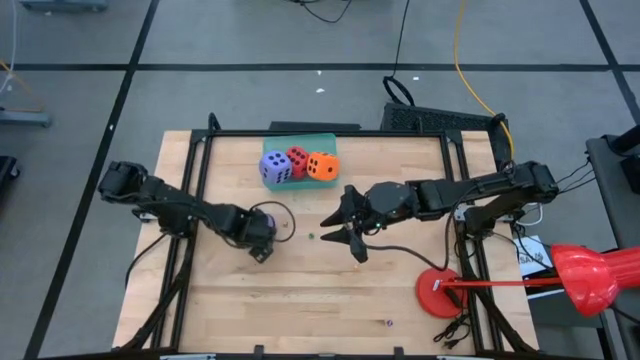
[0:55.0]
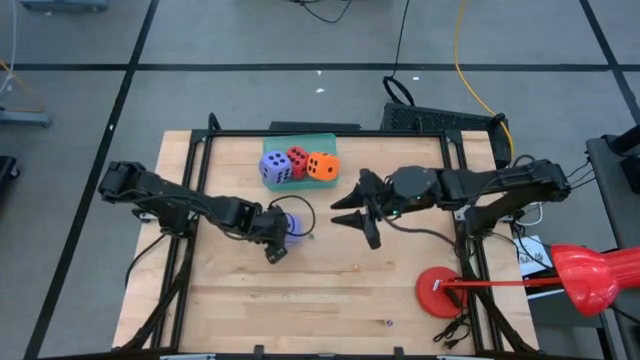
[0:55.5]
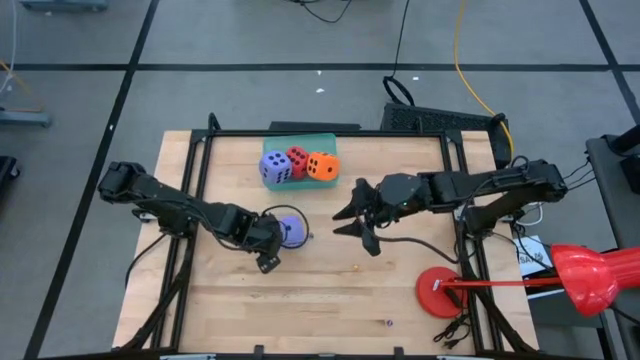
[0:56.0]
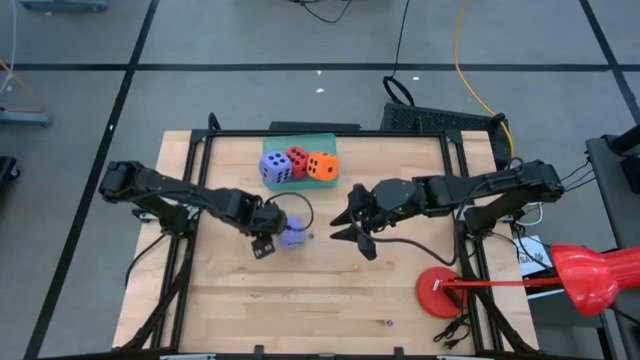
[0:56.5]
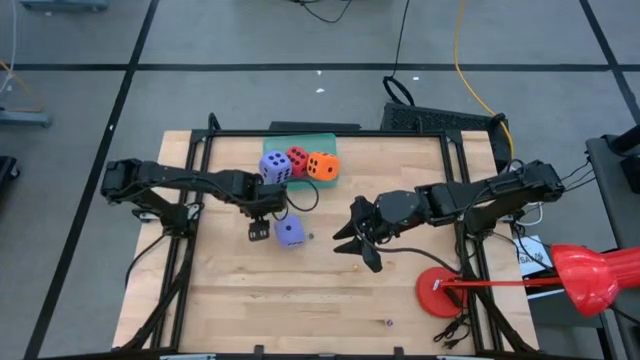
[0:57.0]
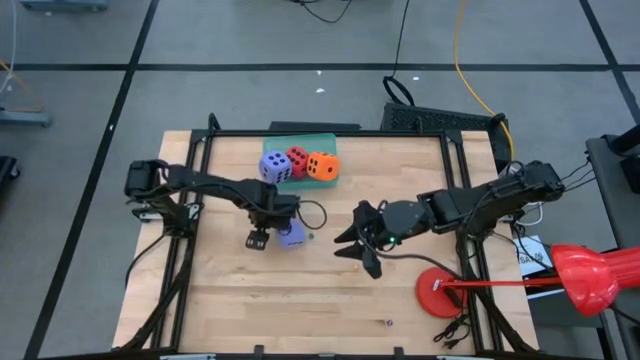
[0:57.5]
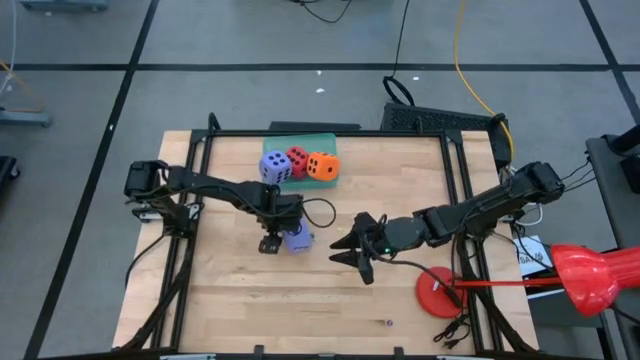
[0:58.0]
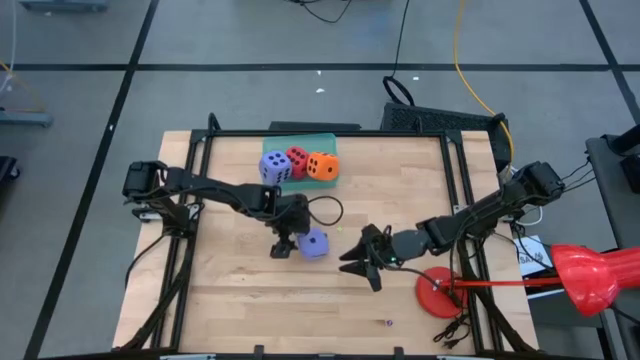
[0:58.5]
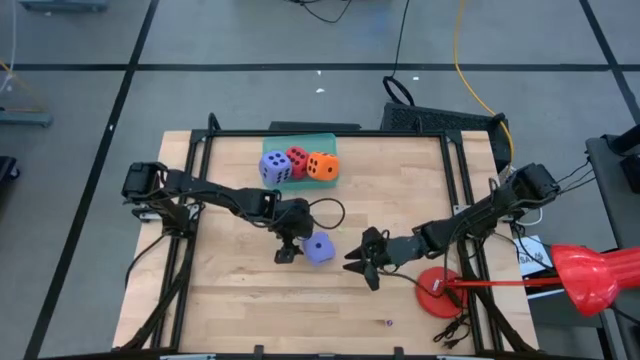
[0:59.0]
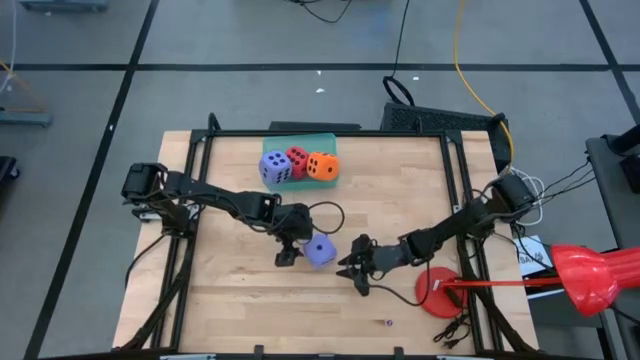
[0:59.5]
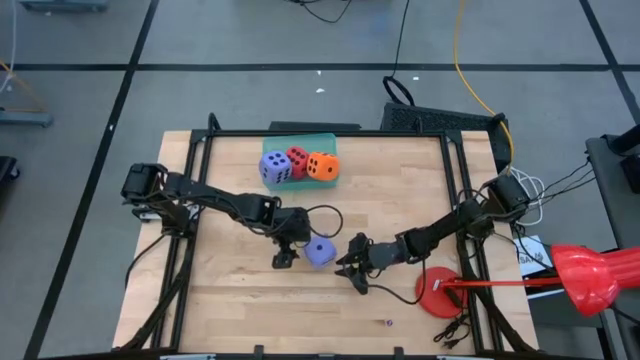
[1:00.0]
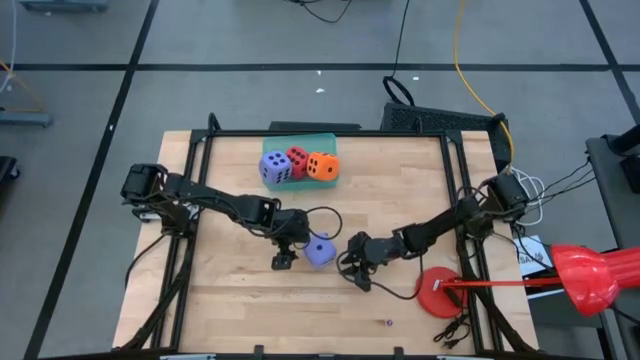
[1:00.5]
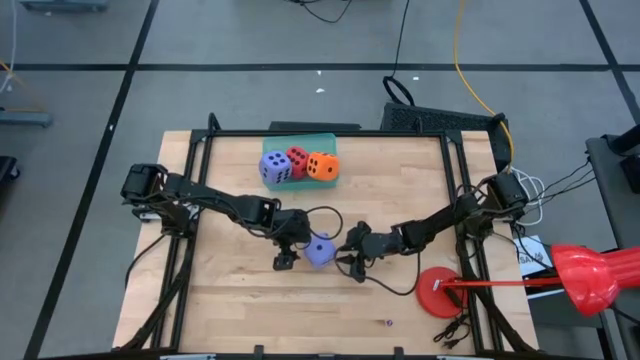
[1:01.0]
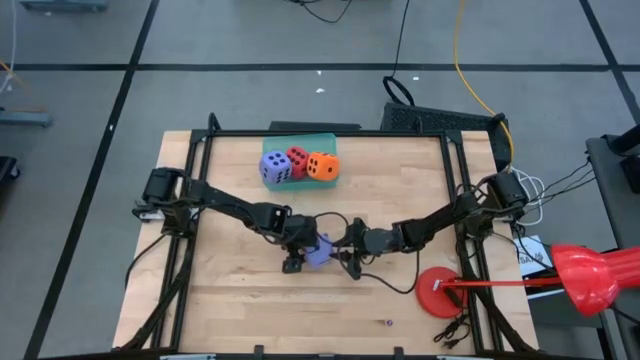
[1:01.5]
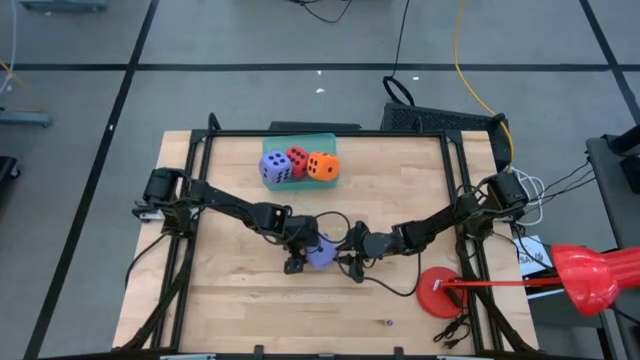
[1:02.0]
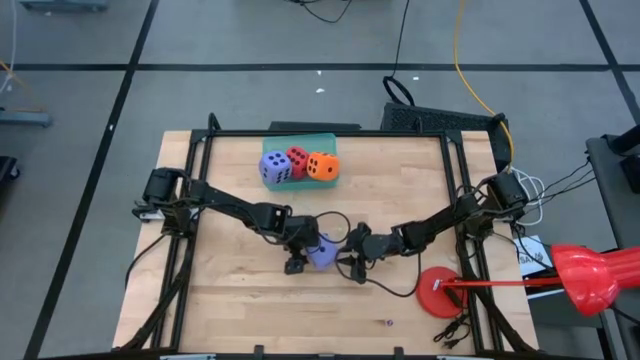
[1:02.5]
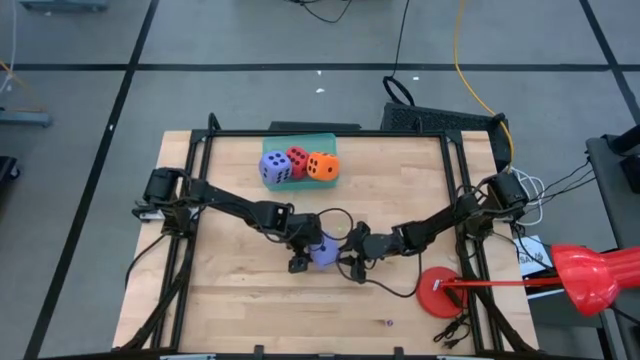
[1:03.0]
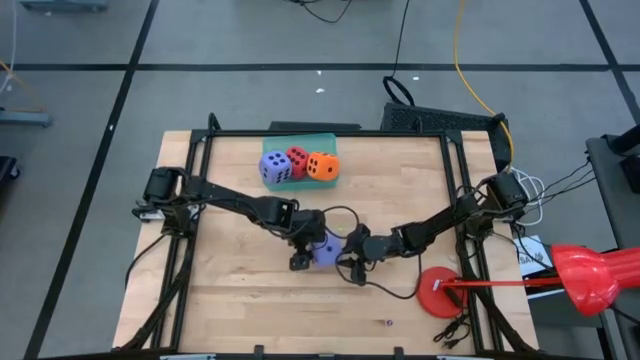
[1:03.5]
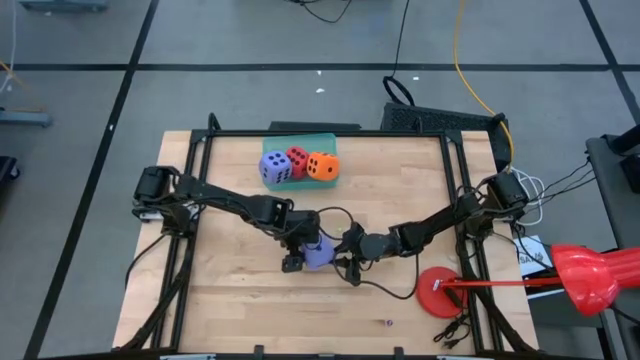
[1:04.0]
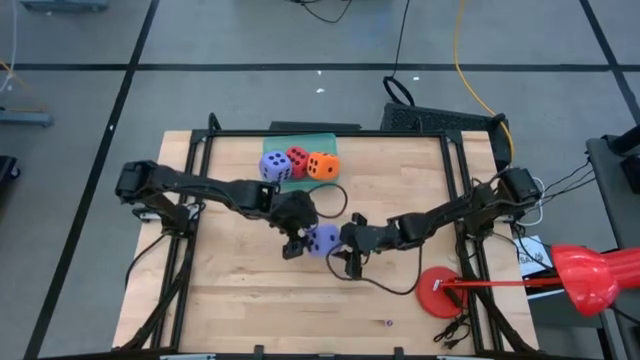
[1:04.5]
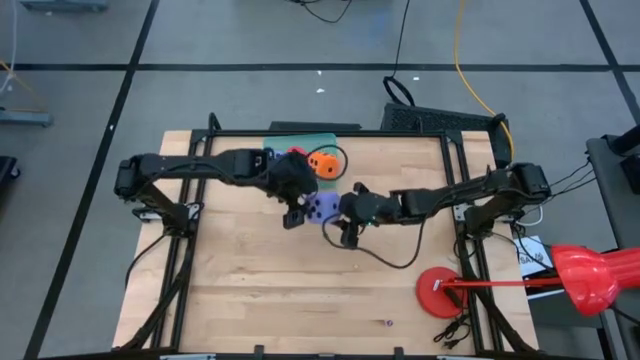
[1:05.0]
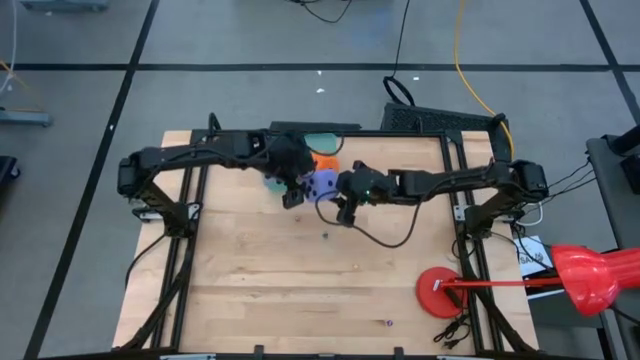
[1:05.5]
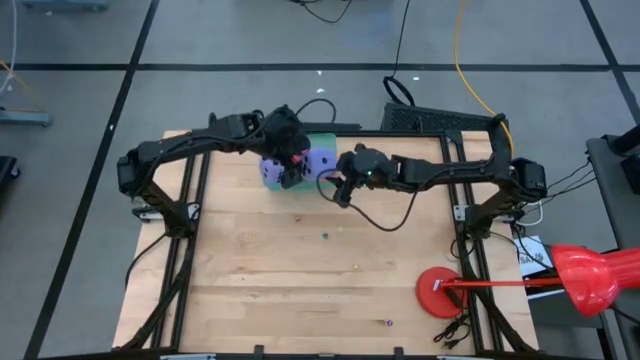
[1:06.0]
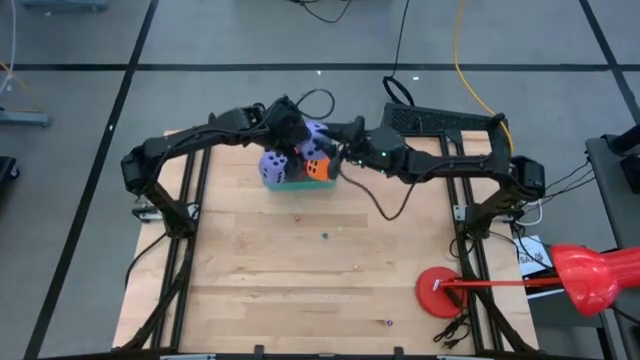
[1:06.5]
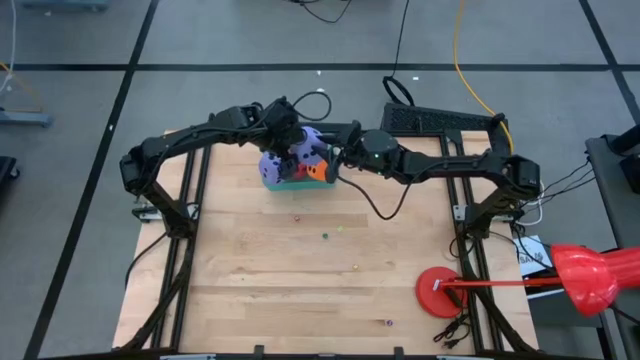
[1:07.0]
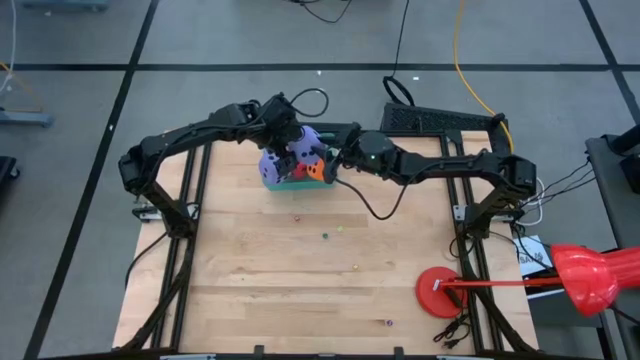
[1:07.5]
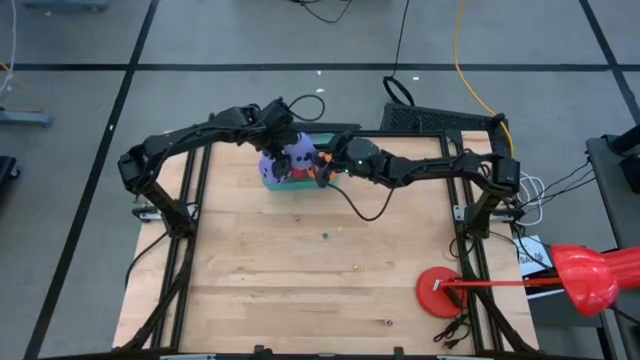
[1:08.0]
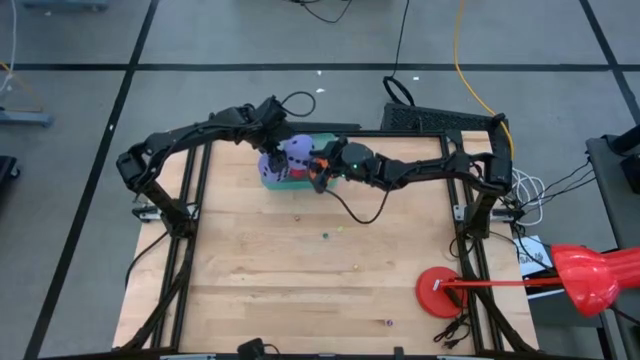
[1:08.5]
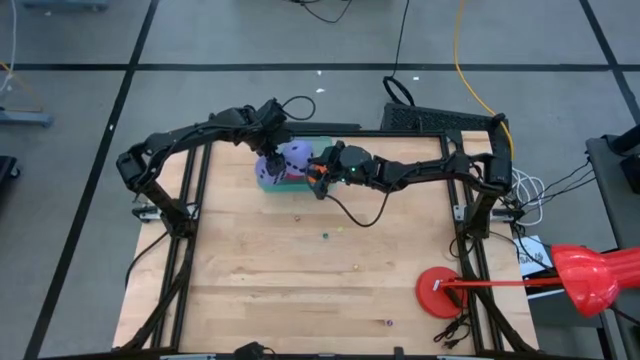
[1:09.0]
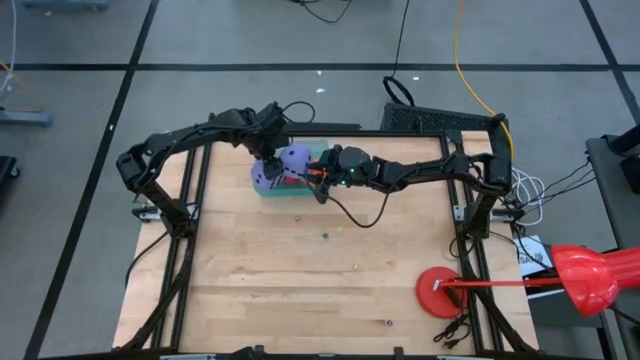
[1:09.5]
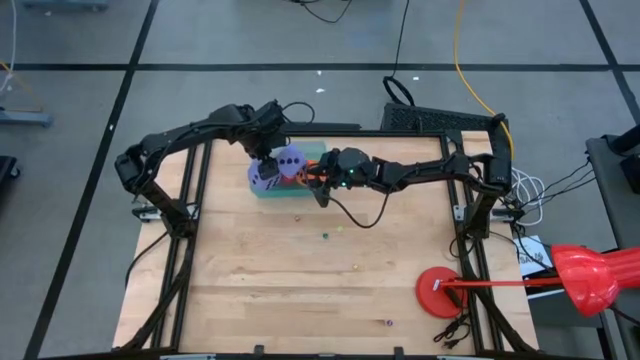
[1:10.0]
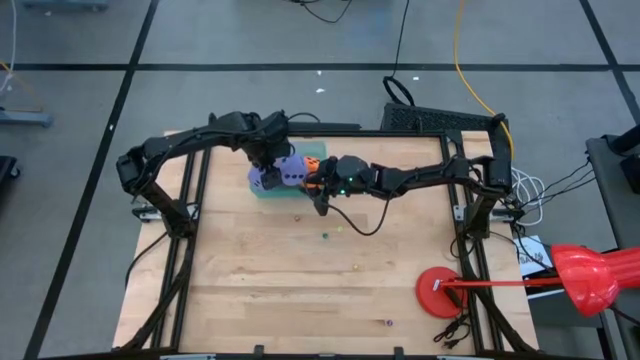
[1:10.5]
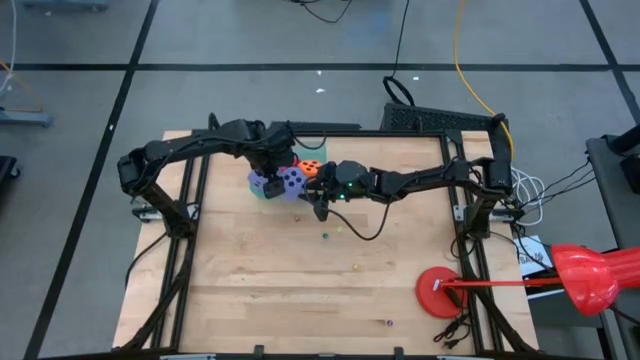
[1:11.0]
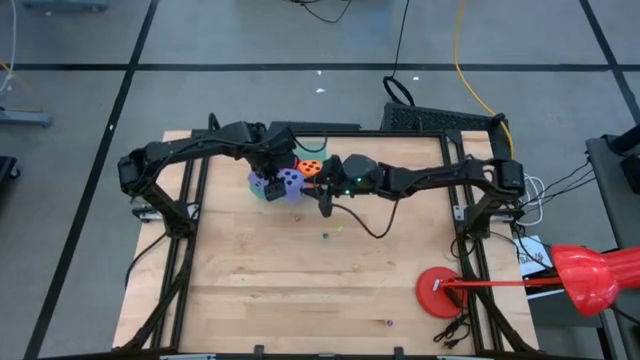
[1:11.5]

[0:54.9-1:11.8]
Task: Pick & Place Dice
Put the large purple dice into the green bin

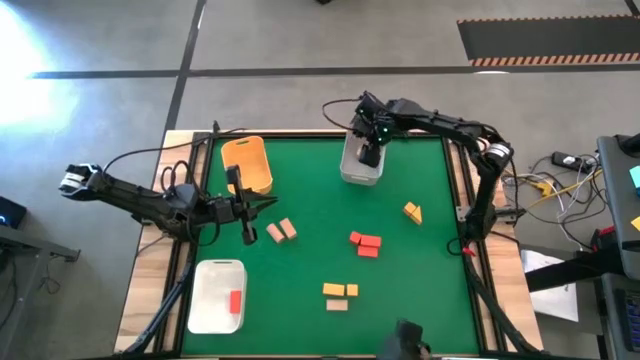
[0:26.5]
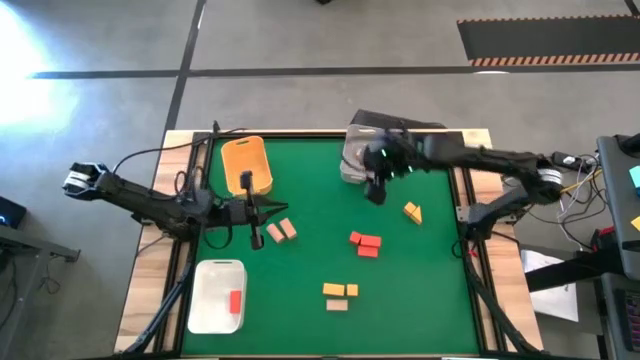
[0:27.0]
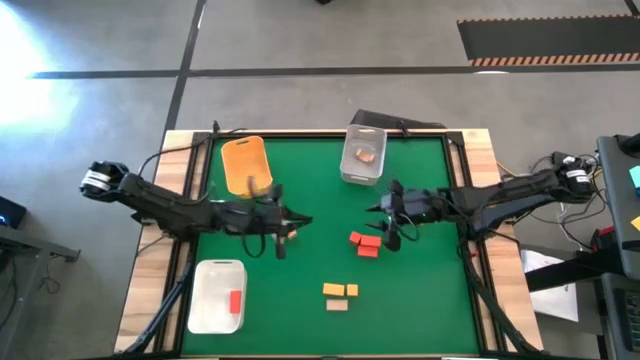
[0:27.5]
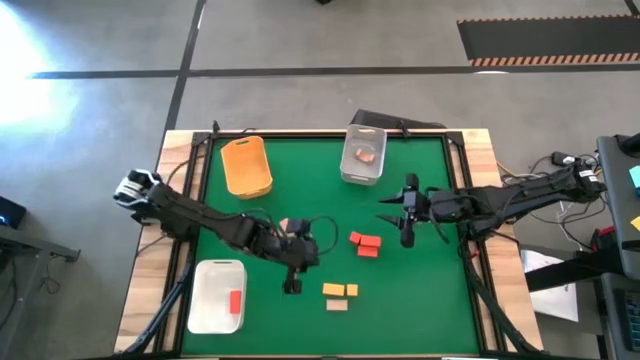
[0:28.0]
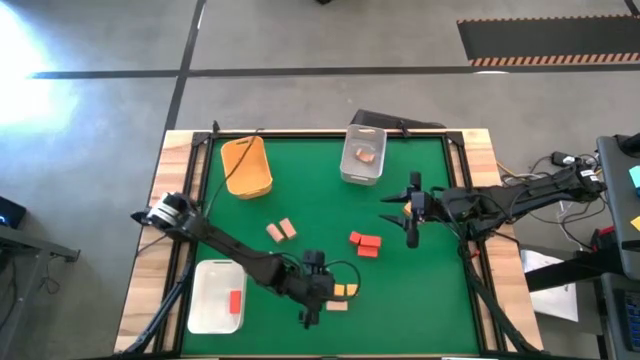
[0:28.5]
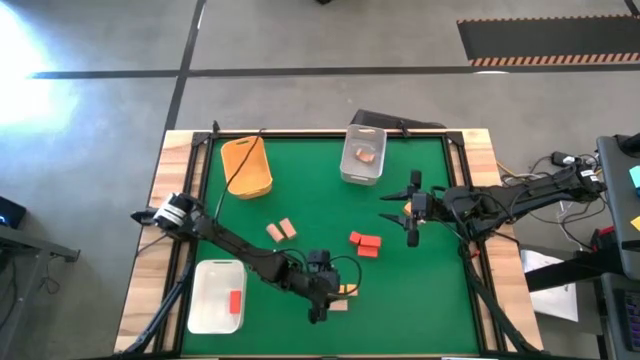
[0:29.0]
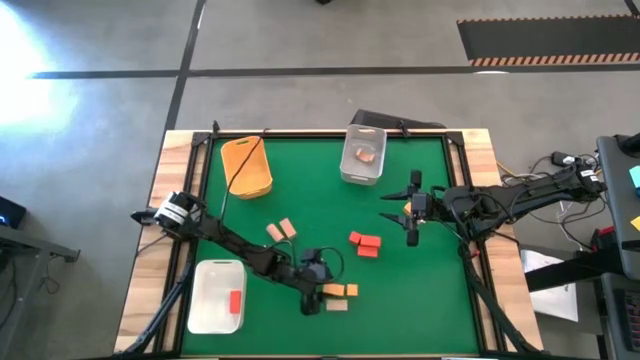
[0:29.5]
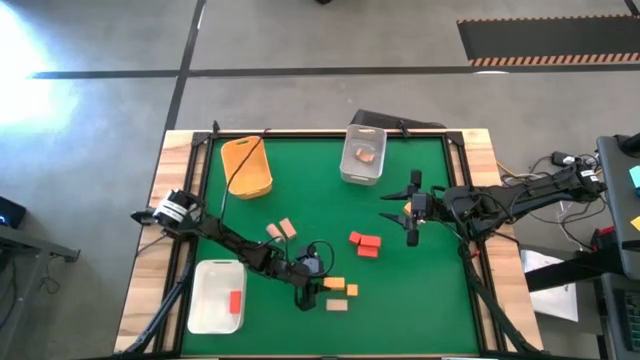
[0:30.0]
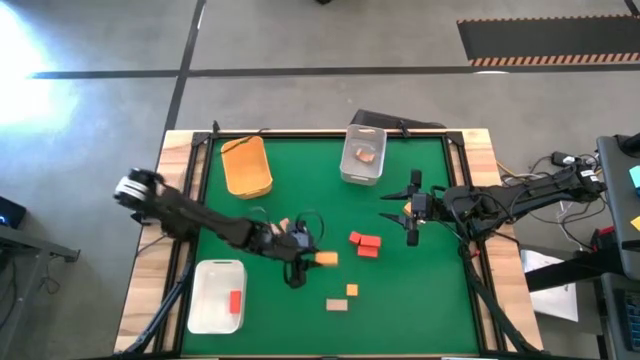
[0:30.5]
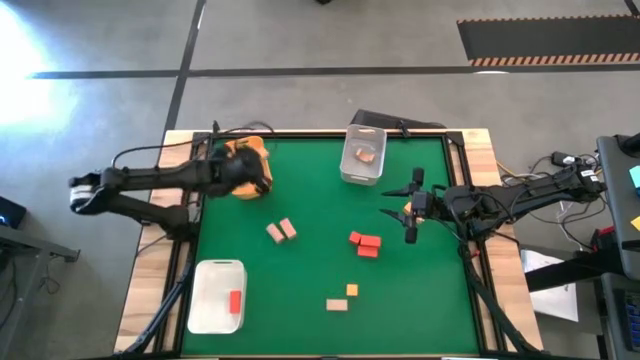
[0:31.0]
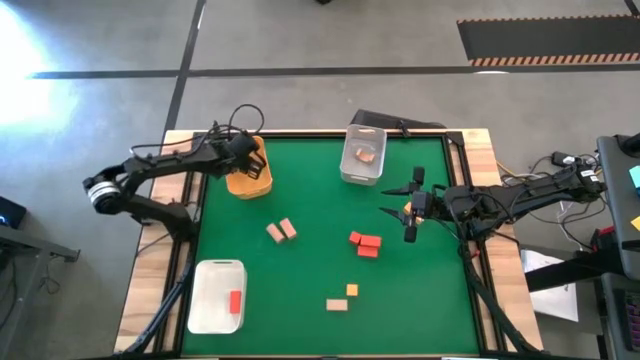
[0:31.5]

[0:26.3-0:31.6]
Task: Sort & place blocks by color
Put the yellow block into the yellow bin
